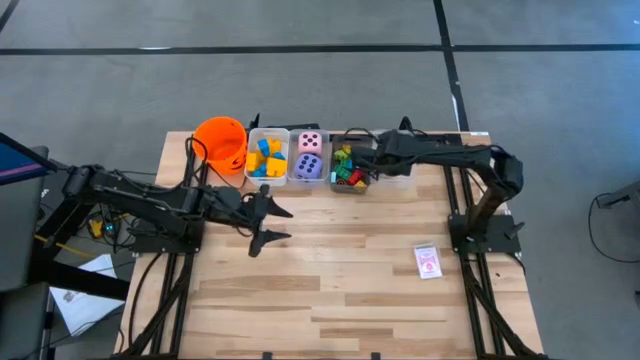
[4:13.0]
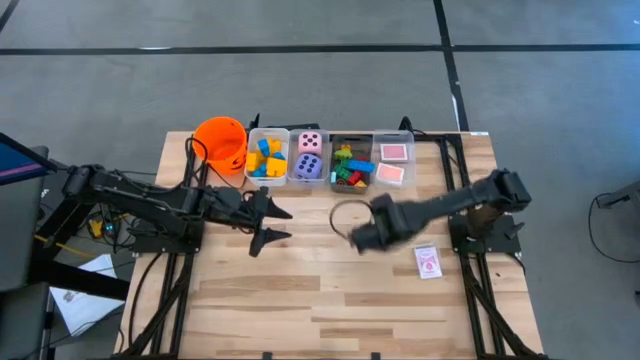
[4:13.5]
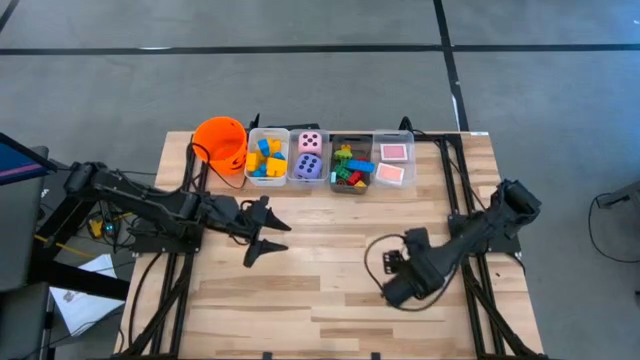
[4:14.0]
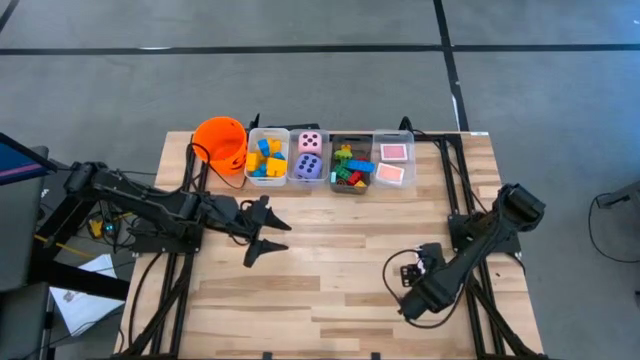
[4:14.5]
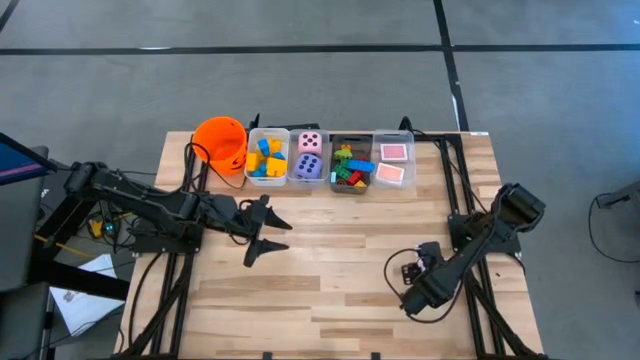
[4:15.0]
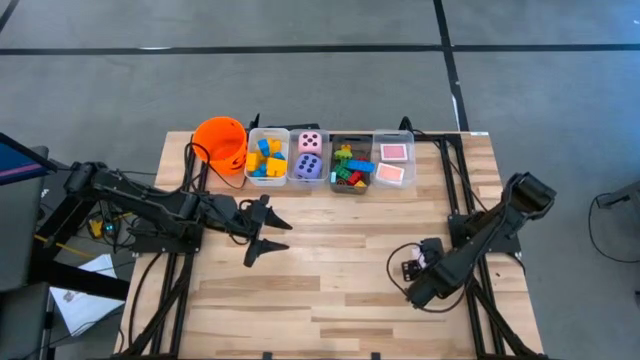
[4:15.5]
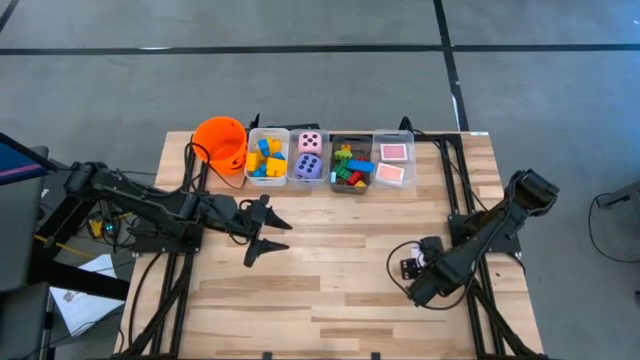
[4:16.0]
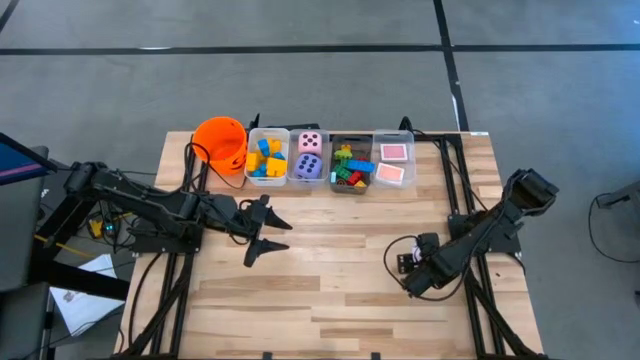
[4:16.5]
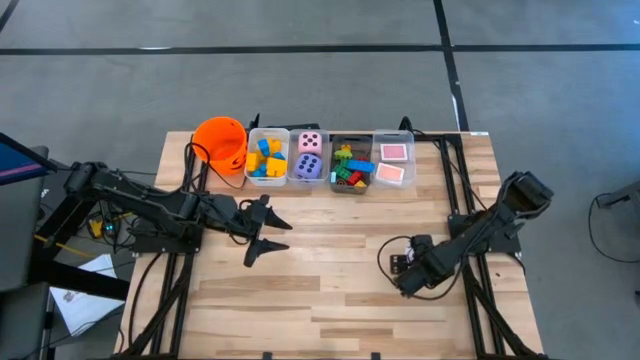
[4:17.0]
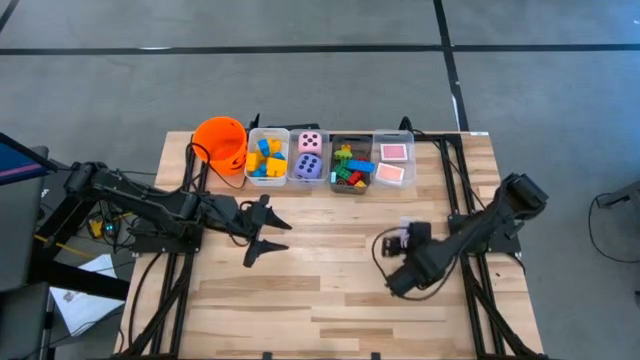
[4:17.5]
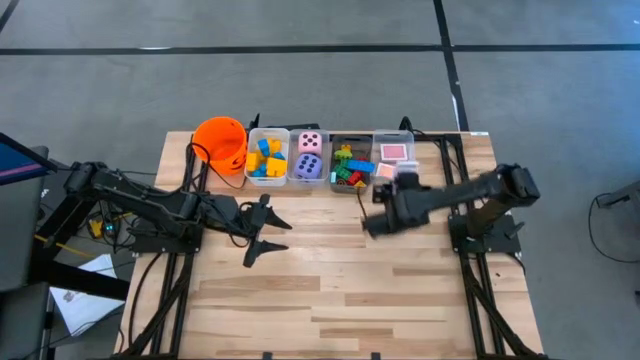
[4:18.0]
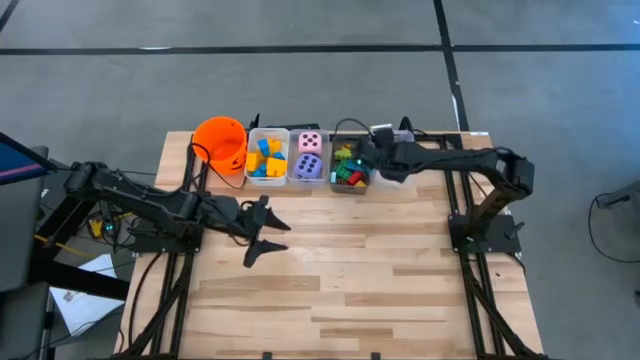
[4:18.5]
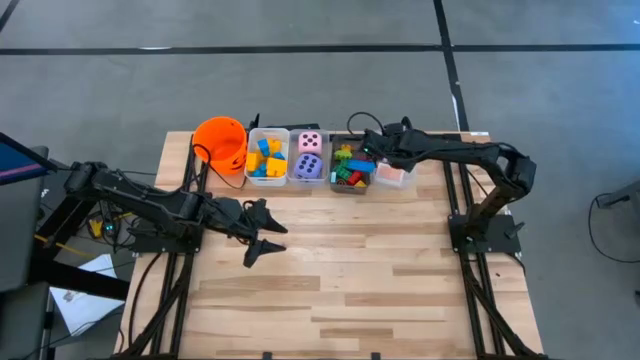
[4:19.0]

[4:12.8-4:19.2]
Task: Pick & Place Toys
Put the pink deck of cards into the right transparent bin

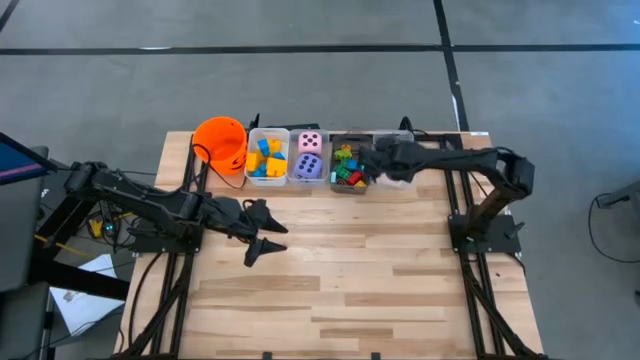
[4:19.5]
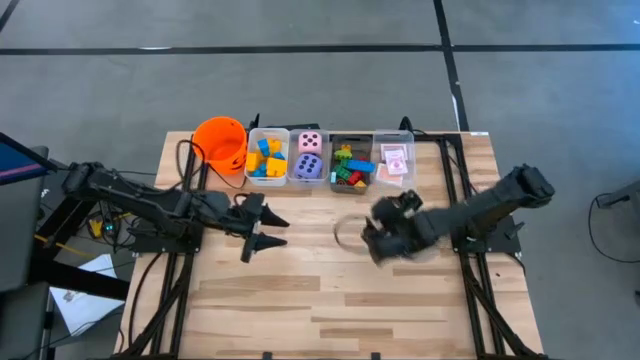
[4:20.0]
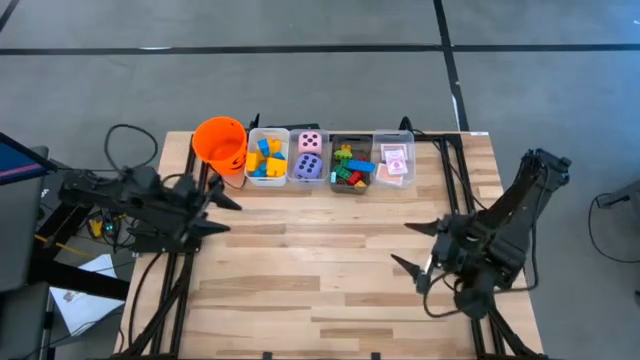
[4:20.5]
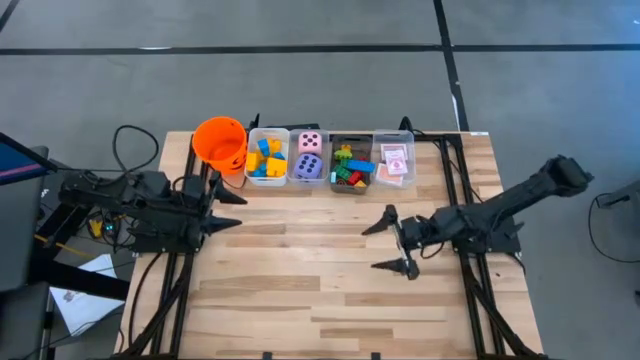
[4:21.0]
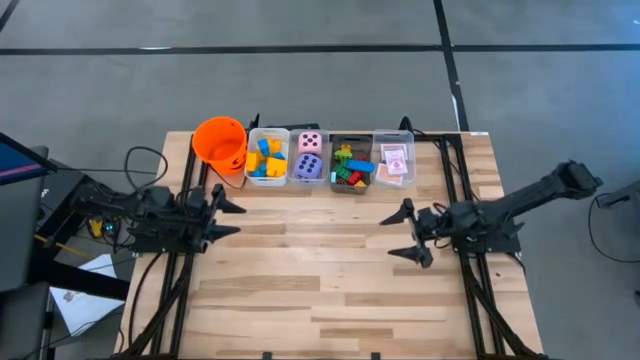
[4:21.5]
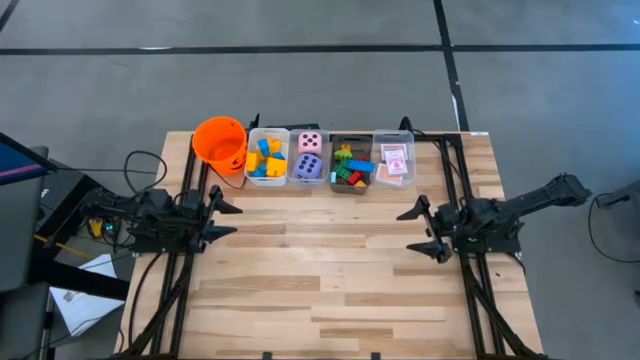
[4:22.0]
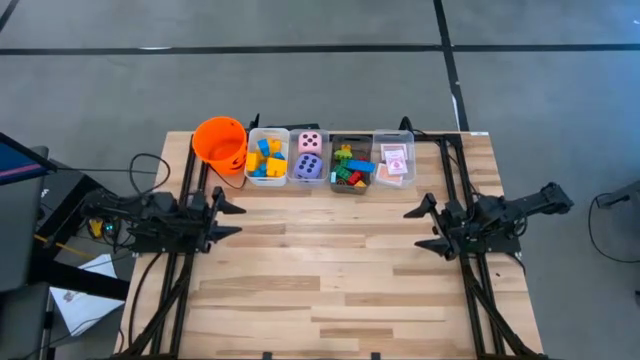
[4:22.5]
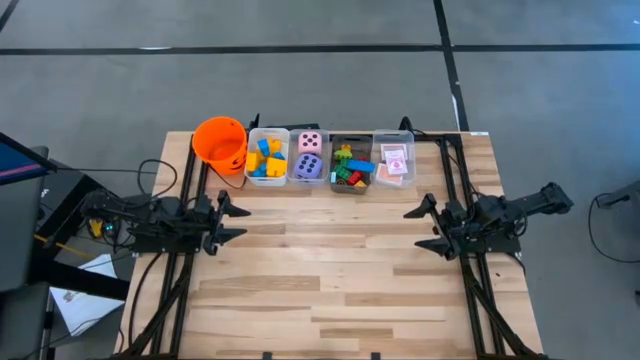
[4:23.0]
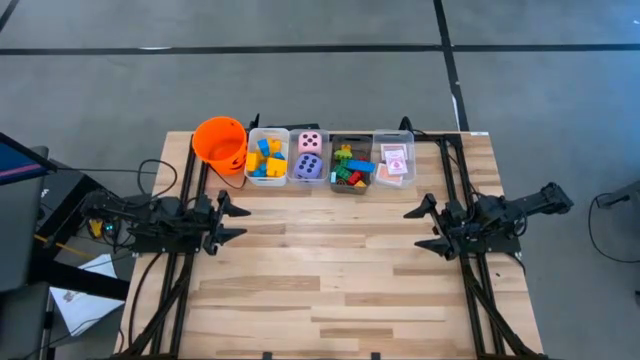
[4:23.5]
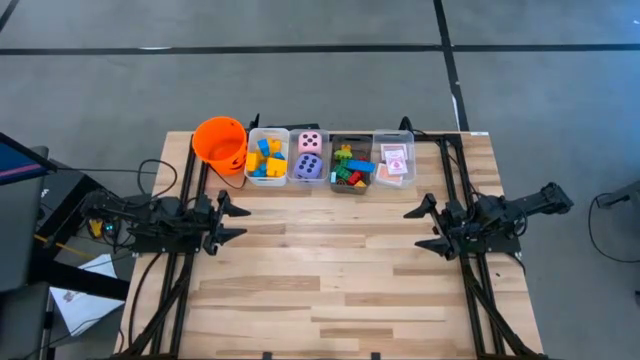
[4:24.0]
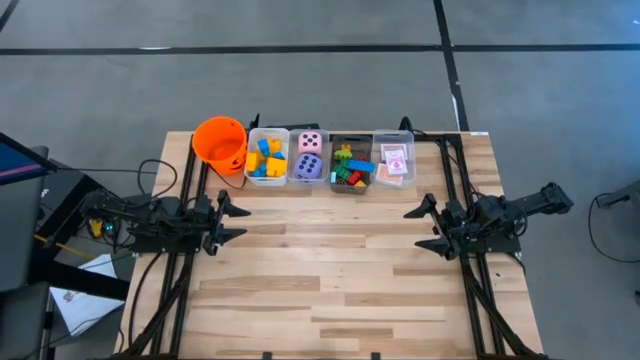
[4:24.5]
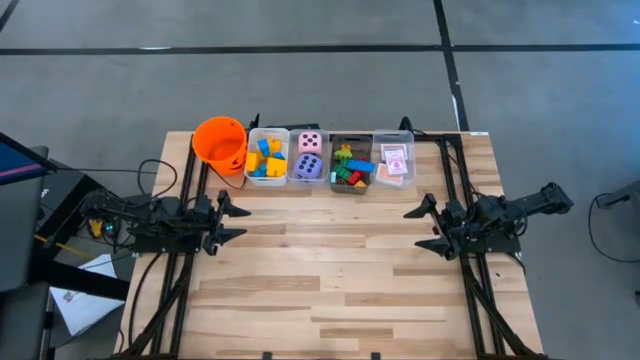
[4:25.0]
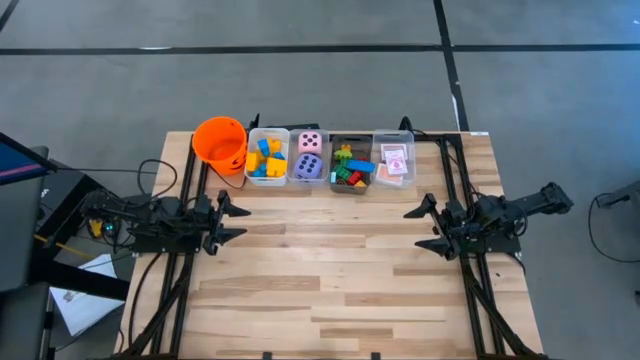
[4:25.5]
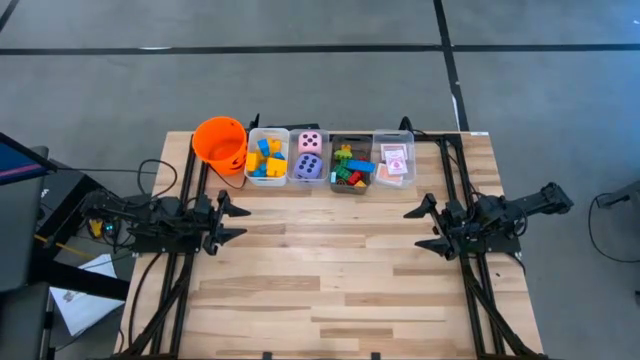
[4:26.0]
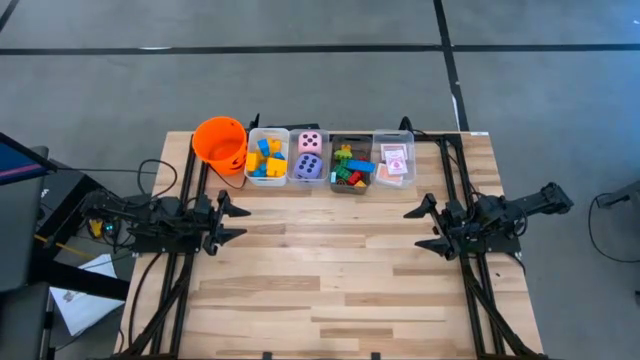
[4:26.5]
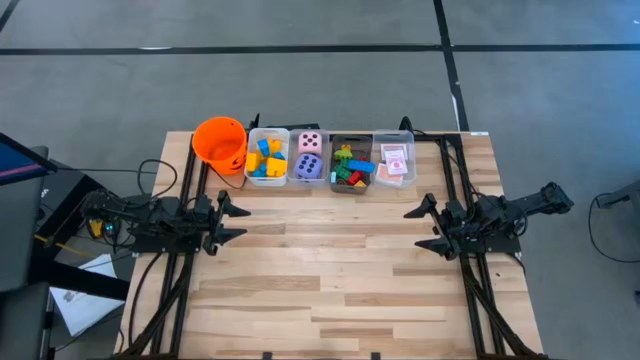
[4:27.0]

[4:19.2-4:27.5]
Return to Home Position

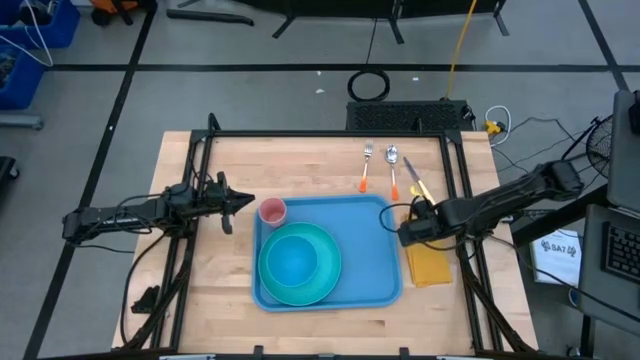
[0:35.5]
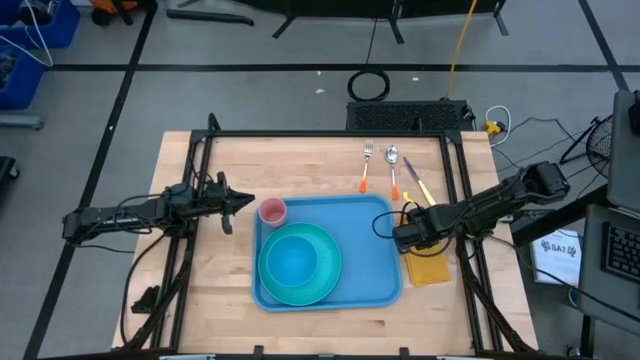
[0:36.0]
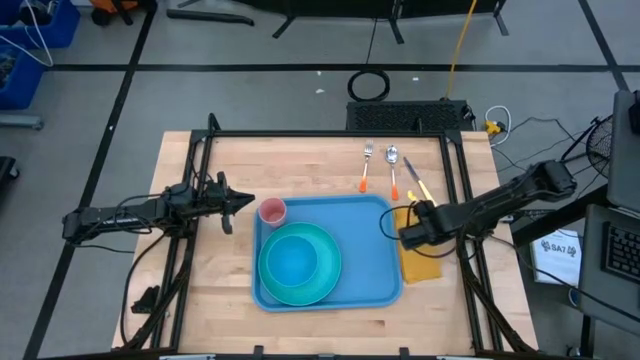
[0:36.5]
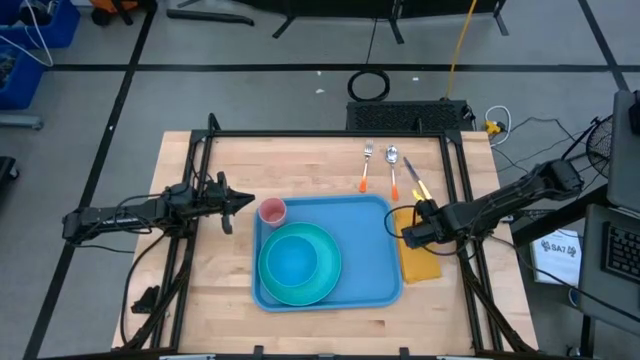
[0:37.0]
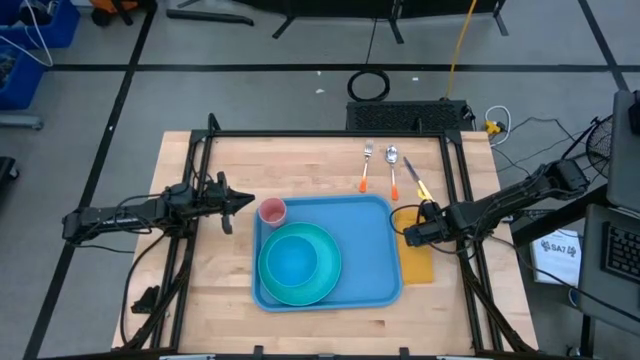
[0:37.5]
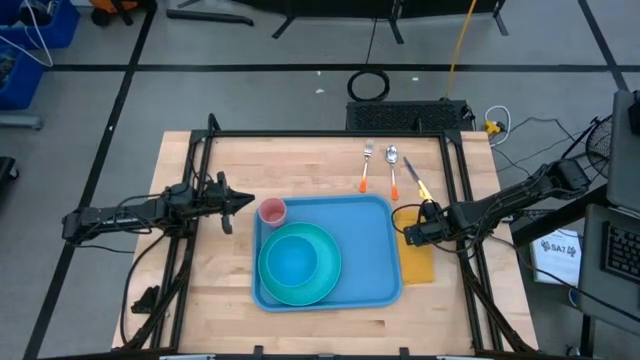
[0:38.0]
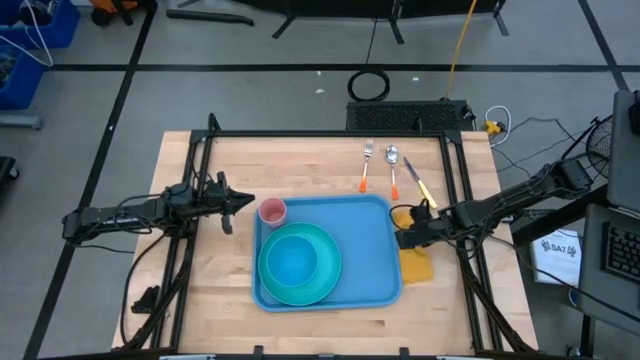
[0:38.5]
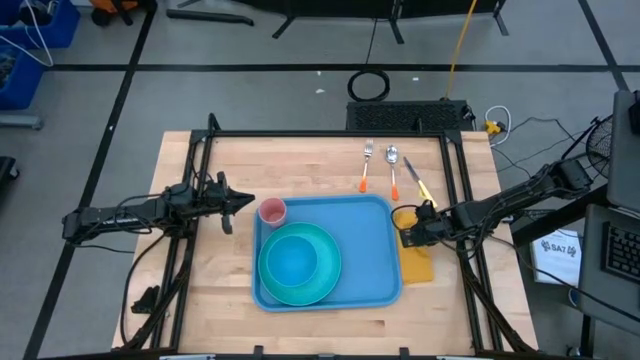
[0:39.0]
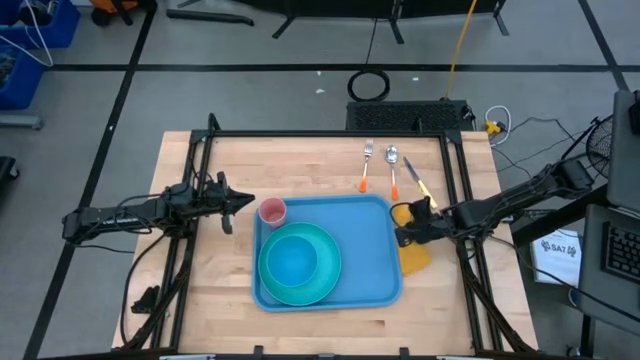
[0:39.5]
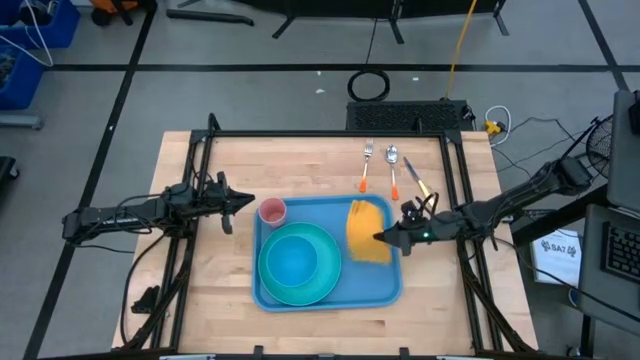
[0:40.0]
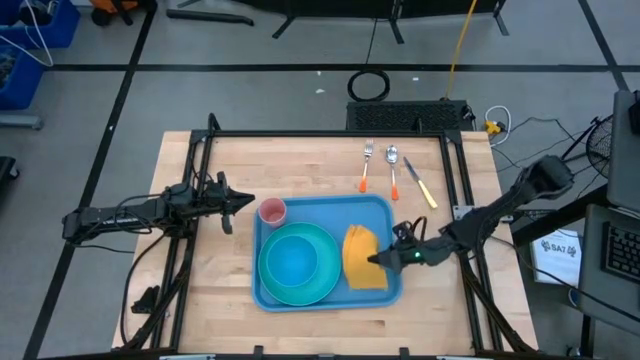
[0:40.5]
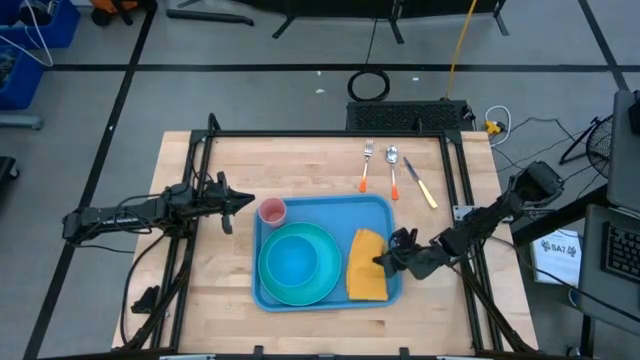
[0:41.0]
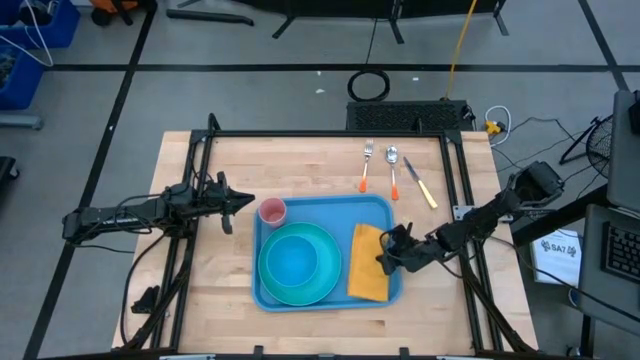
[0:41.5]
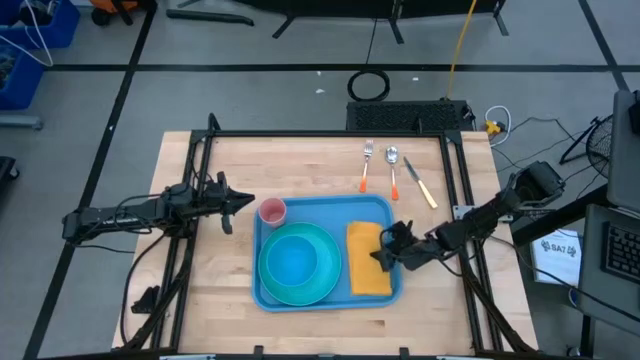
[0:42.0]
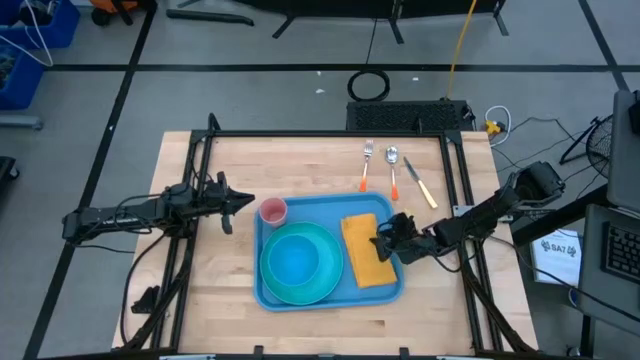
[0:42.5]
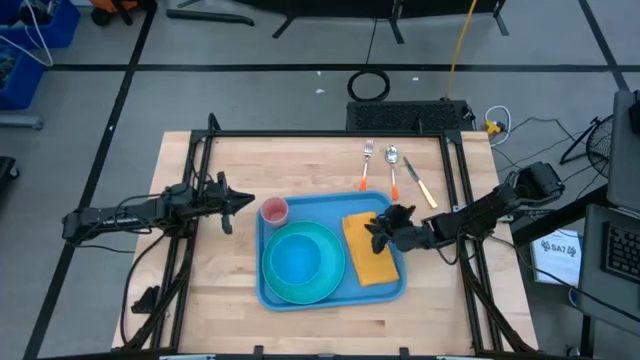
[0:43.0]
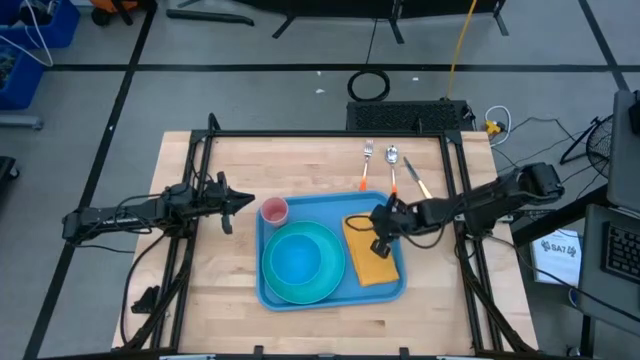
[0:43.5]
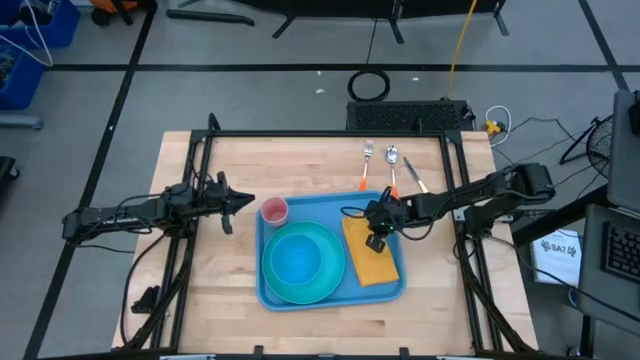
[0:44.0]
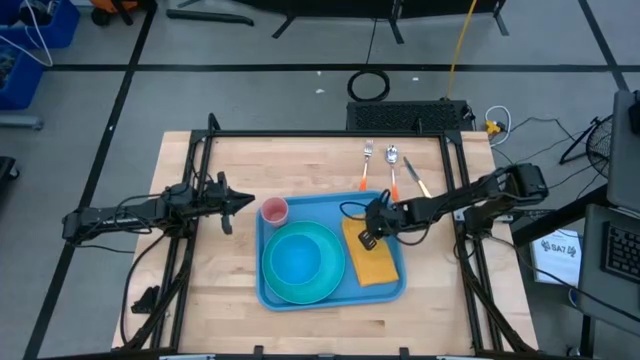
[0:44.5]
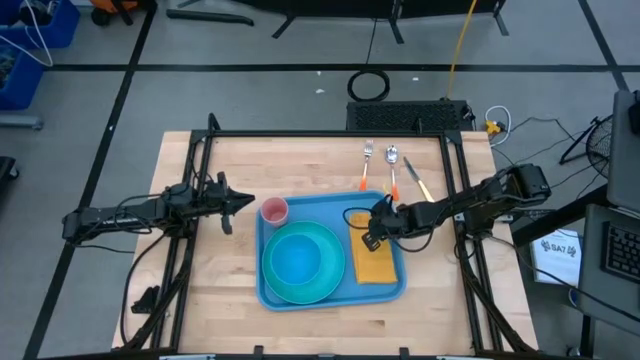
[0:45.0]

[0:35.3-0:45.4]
Task: Set up tray
Put the yellow napkin on the blue serving tray to the right of the light blue plate
